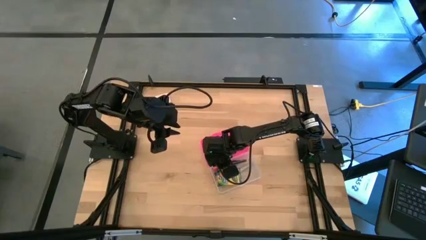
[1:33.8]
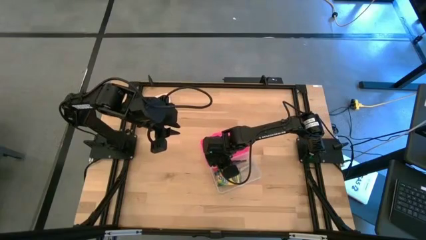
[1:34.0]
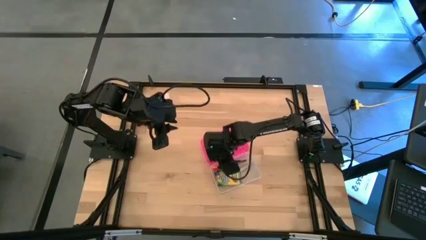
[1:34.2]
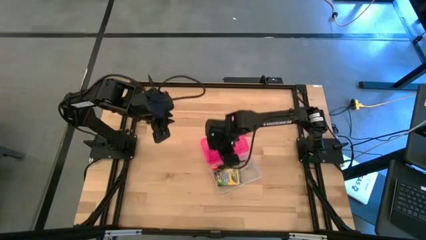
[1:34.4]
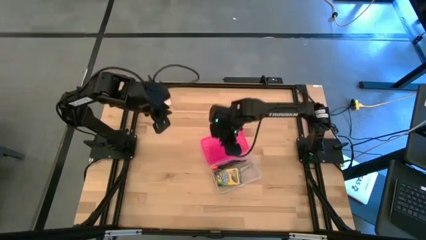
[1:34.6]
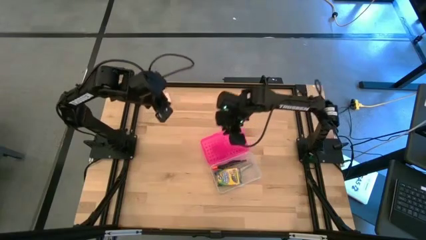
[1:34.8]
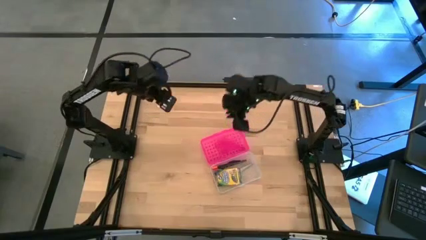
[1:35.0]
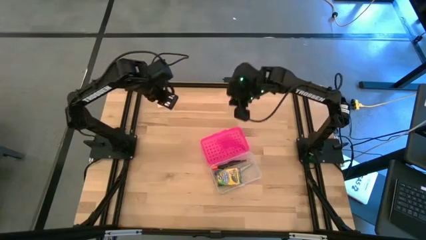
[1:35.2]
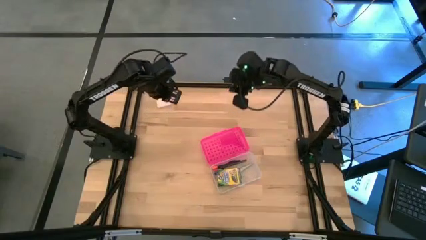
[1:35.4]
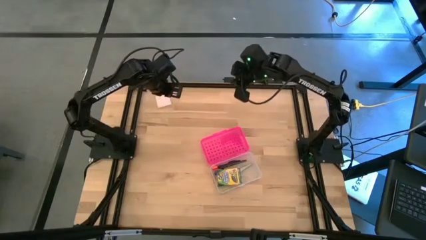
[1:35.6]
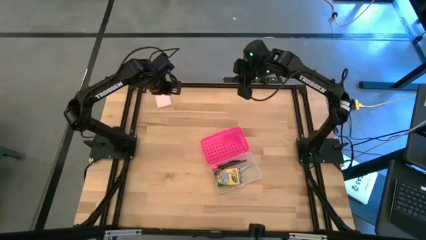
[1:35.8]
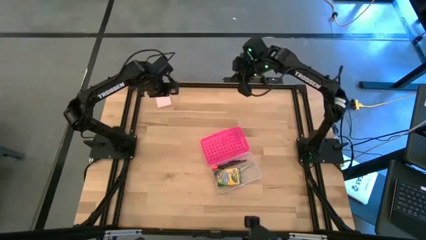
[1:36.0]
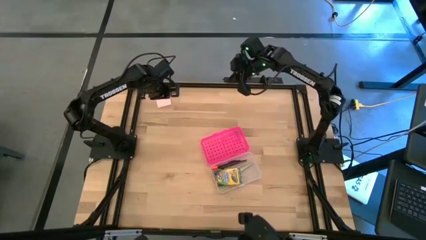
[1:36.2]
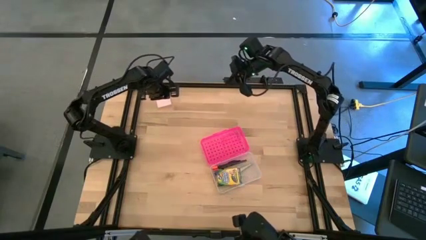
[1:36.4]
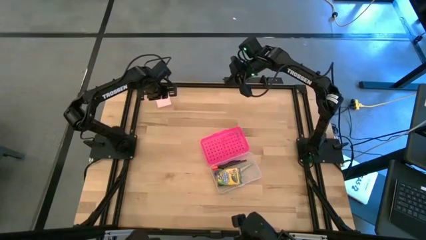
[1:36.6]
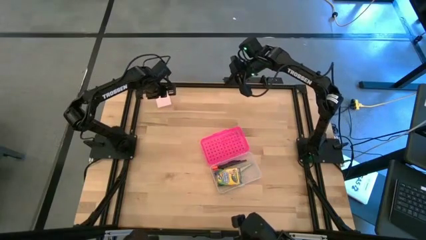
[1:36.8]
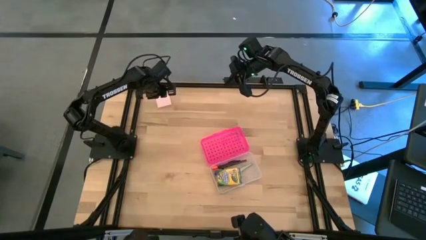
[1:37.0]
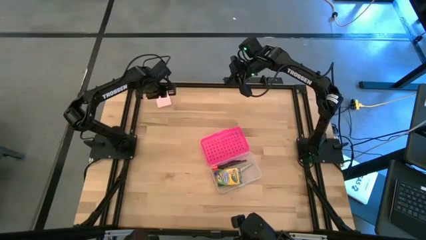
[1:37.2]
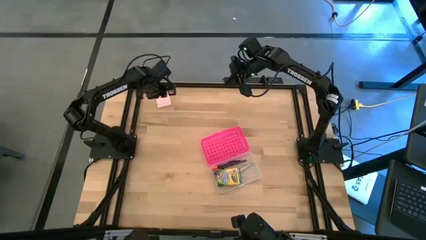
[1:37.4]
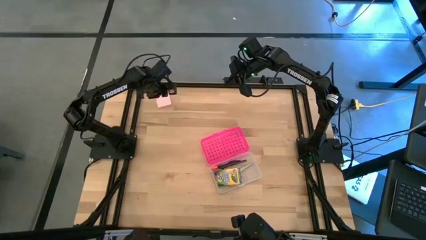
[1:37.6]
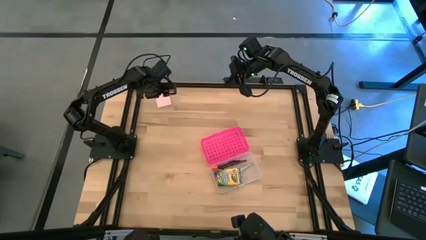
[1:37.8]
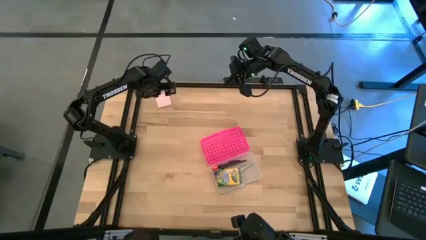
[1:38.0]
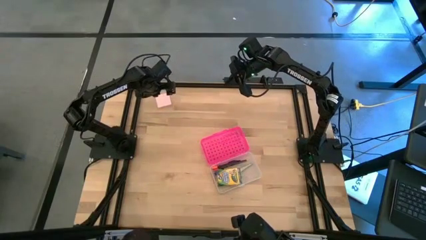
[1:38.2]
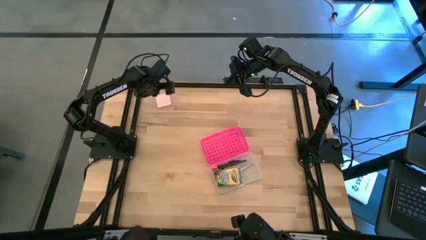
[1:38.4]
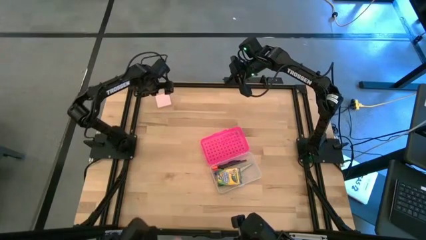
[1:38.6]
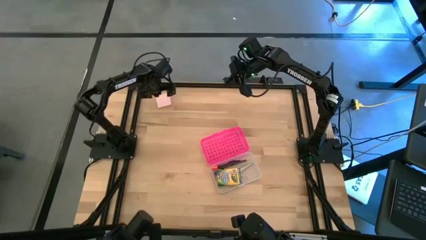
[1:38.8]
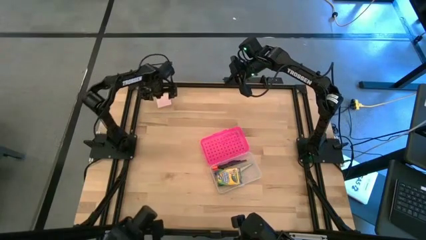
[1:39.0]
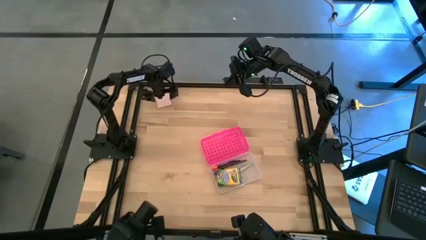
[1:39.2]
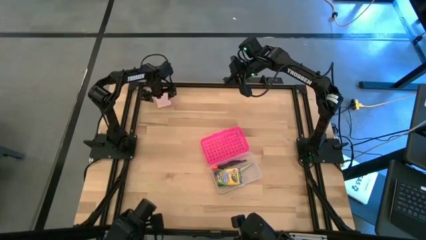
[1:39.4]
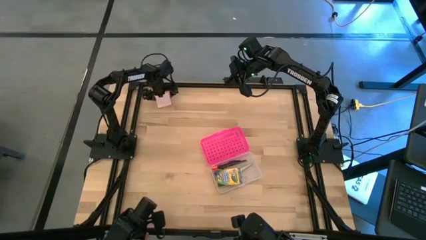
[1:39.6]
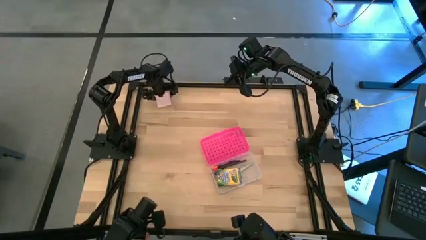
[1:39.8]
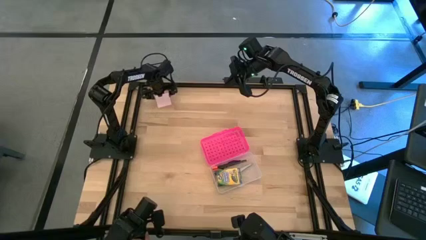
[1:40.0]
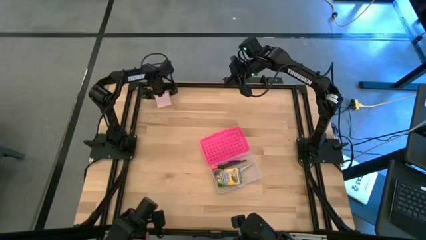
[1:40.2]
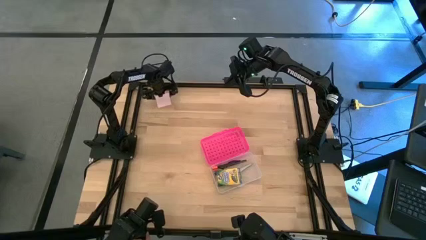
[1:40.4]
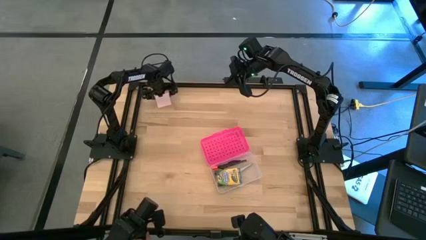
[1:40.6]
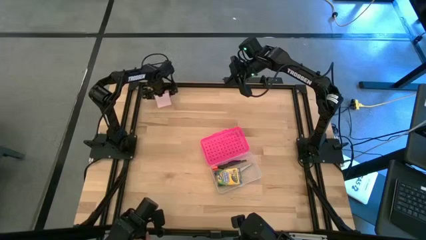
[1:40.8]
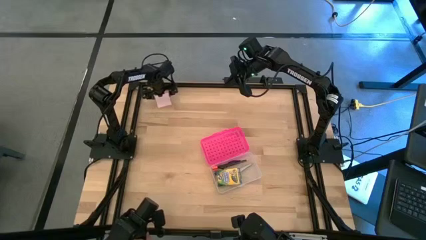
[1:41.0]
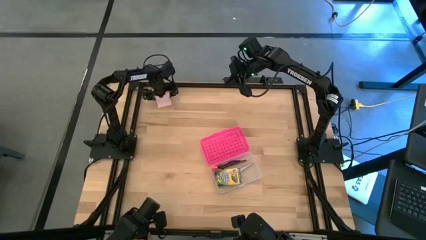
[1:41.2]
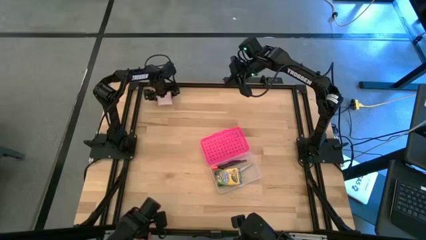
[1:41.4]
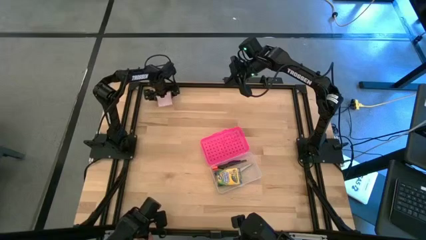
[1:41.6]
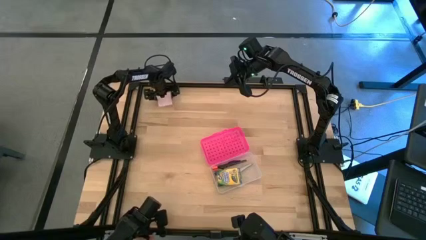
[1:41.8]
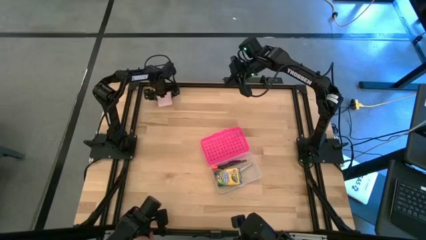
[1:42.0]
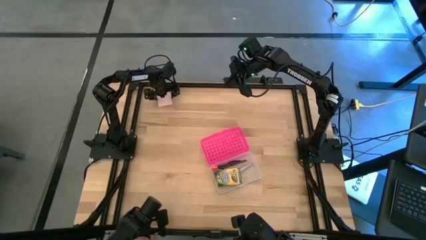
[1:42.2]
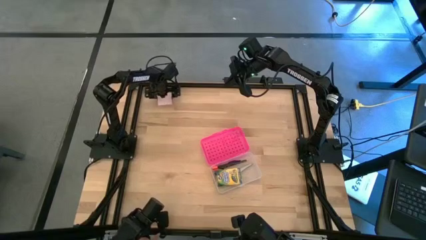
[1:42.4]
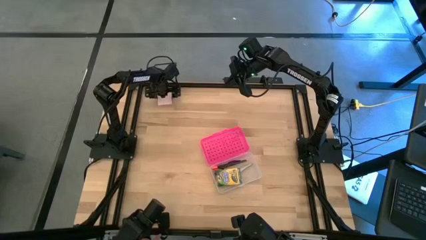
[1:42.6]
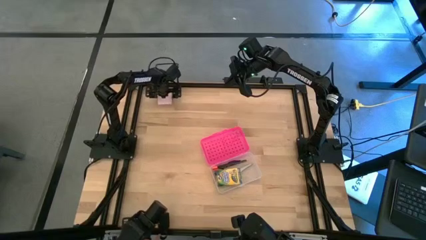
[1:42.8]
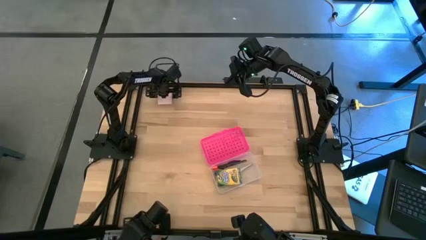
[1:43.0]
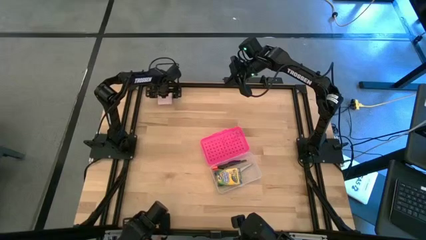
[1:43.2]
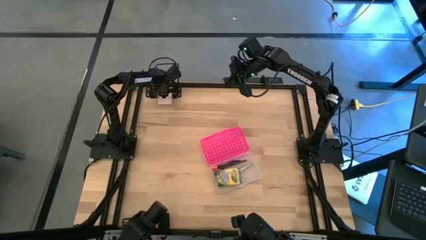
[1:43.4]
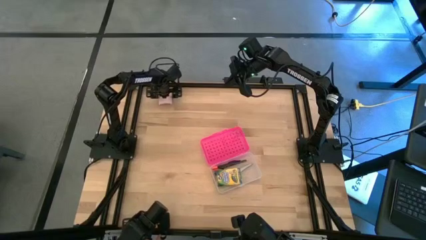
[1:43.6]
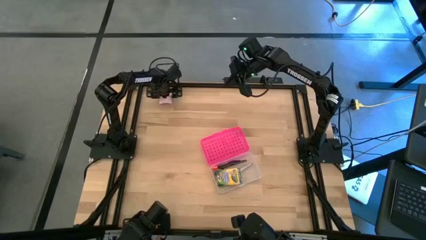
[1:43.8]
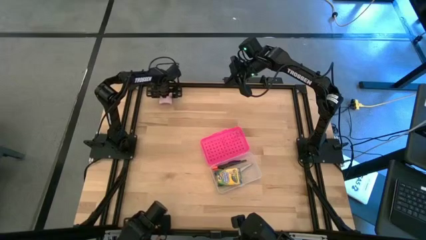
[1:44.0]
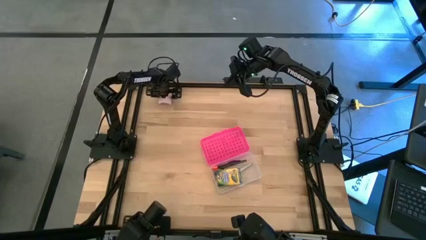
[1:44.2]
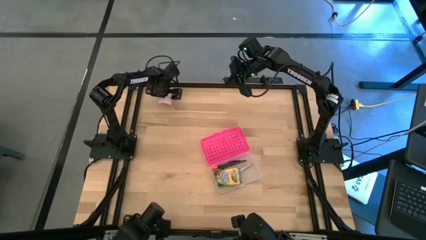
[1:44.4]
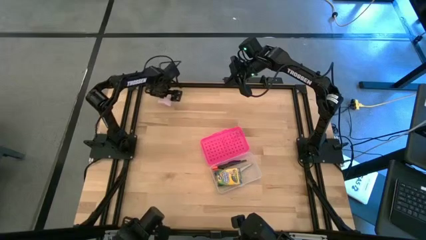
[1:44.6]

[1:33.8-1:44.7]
Task: Pack school essentials
Put the sticky note into the pink box

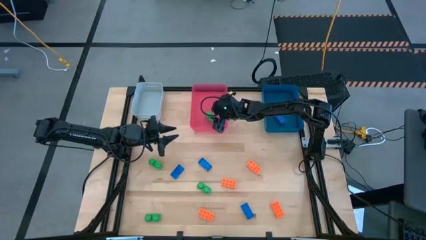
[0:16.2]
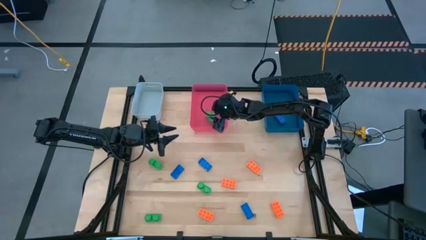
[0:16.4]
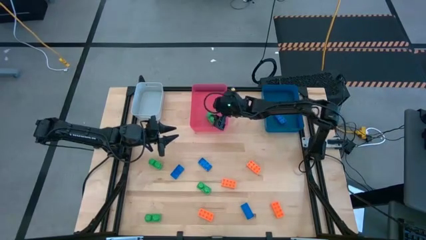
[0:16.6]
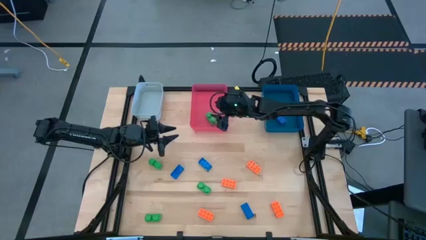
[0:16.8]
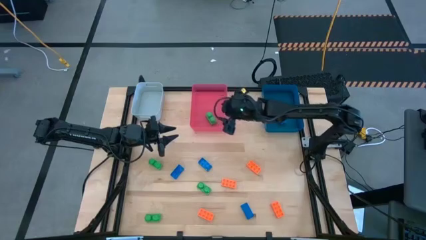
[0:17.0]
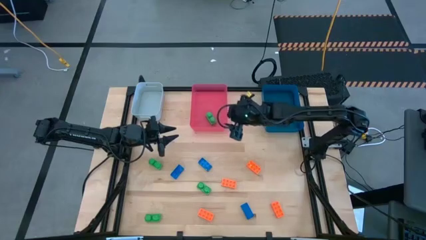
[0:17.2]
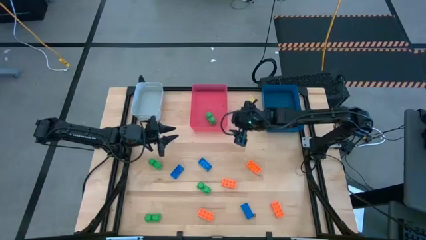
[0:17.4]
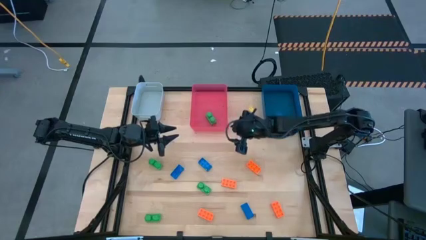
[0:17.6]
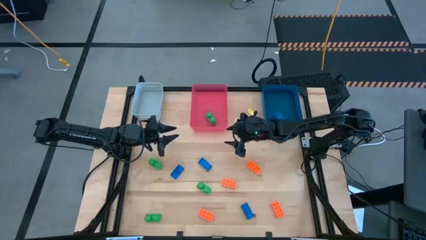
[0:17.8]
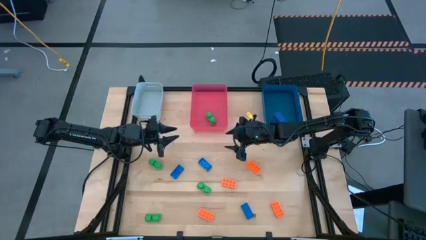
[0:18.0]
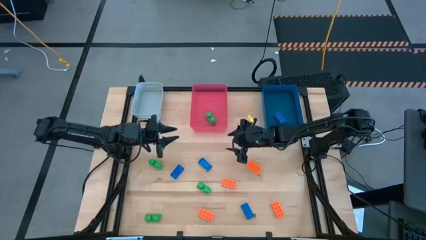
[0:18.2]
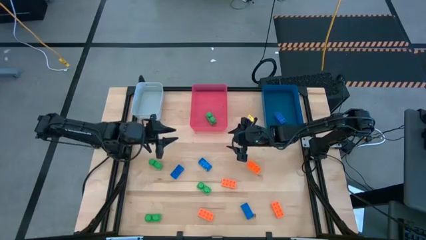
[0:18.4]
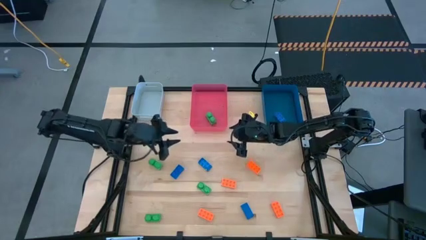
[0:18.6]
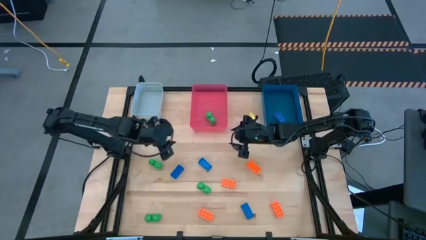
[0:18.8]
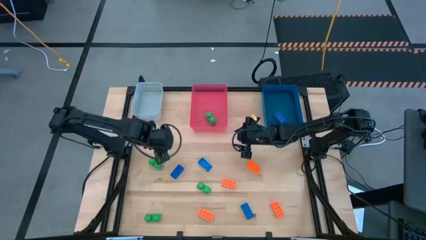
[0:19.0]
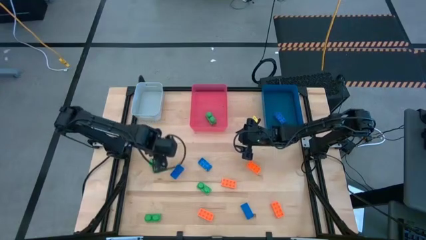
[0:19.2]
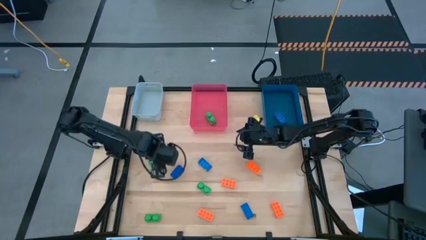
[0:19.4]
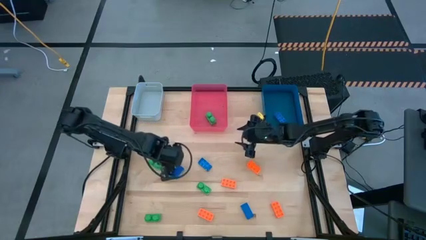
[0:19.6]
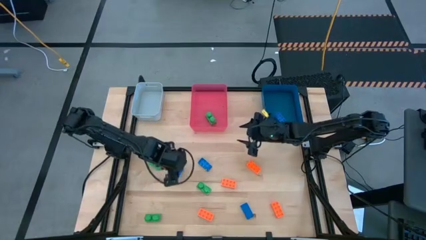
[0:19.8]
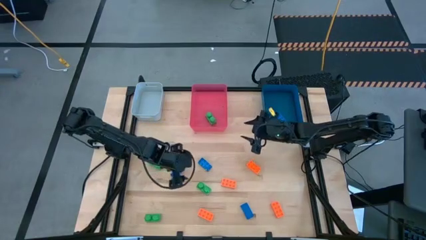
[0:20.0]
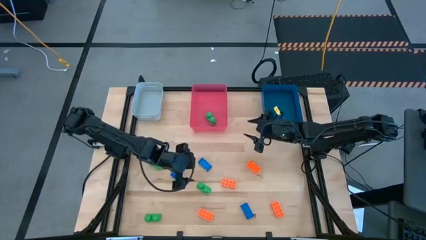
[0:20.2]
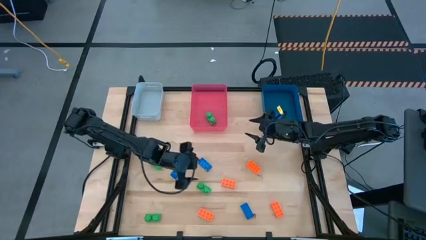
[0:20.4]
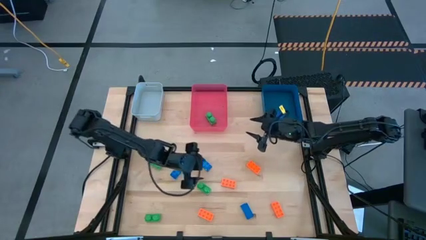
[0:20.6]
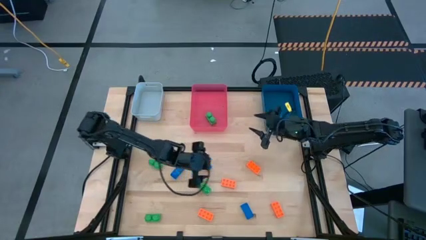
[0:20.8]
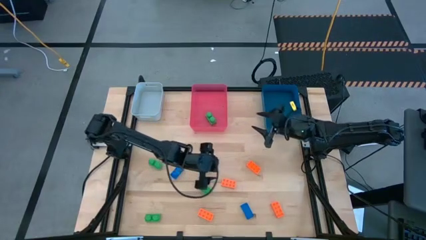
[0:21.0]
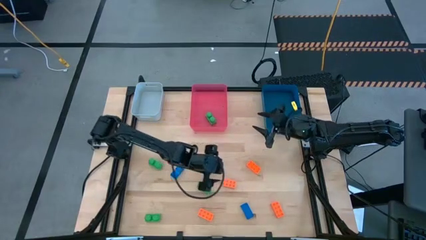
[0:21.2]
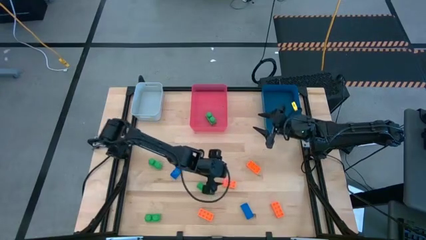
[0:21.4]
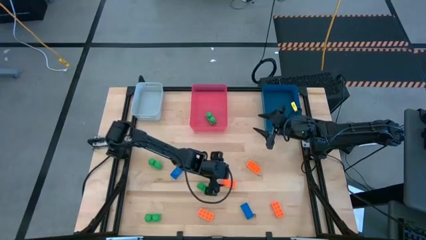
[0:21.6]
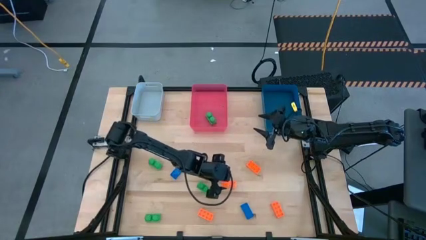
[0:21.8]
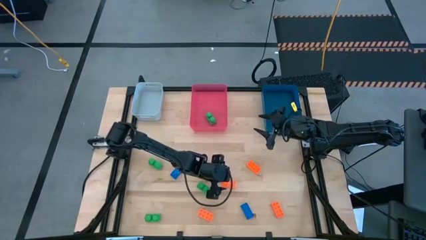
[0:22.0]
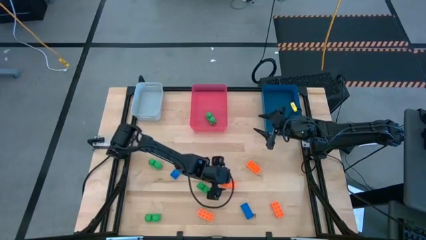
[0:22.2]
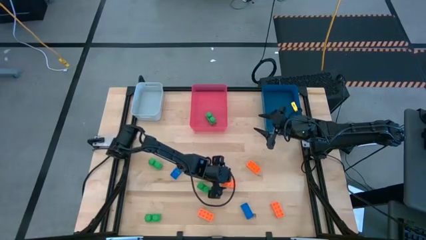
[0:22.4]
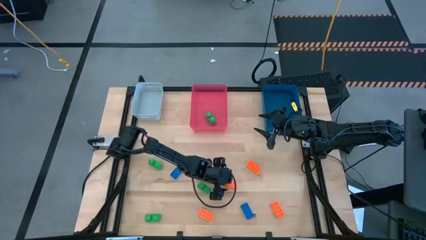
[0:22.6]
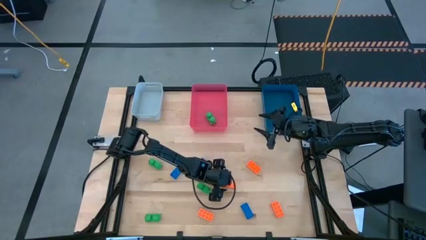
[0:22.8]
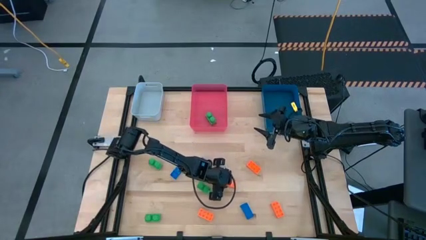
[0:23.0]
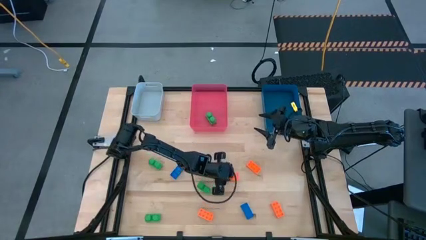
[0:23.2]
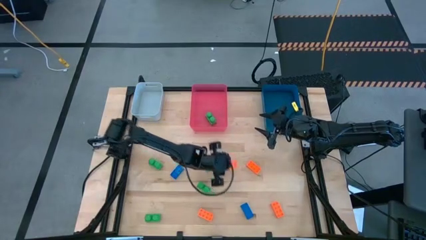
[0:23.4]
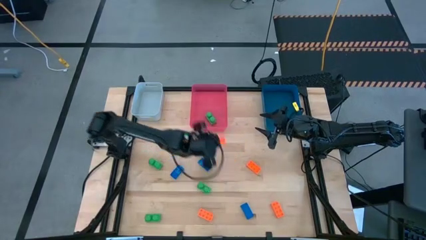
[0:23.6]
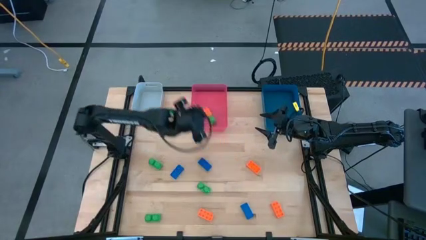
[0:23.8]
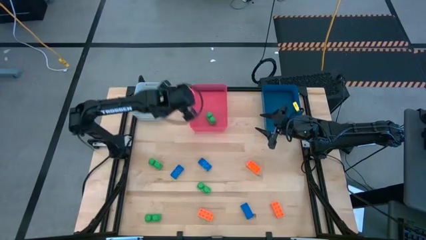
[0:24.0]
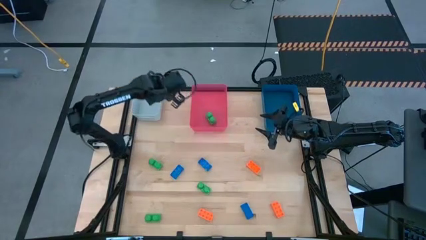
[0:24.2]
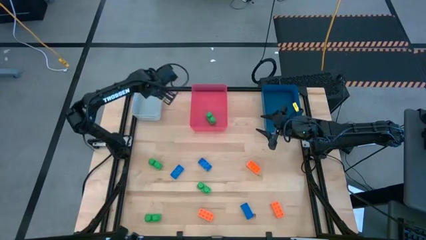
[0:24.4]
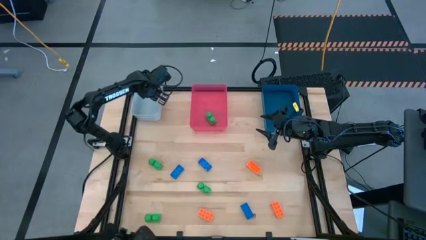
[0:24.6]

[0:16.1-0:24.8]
Task: Sort & place blocks by color
Put the orange game piece into the white bin
